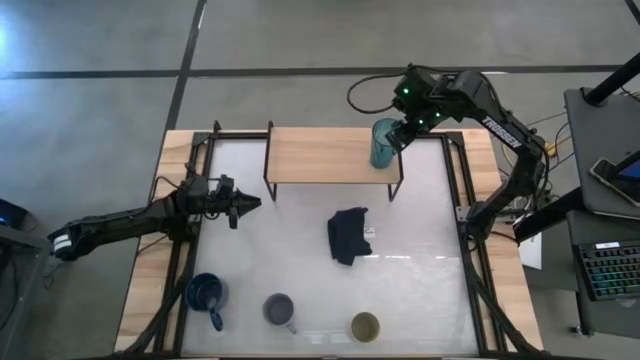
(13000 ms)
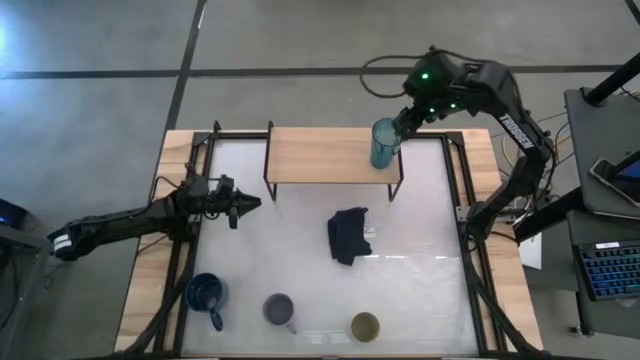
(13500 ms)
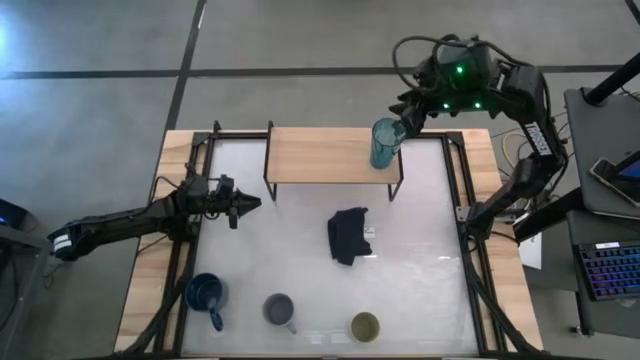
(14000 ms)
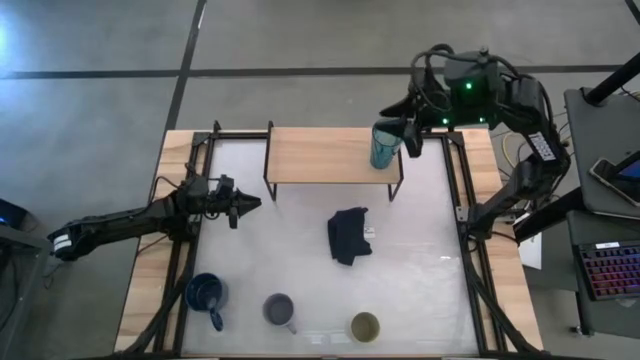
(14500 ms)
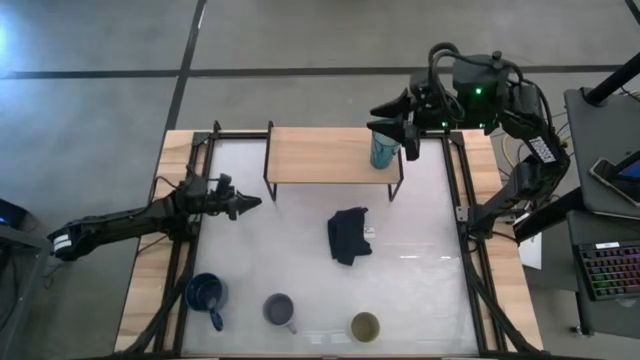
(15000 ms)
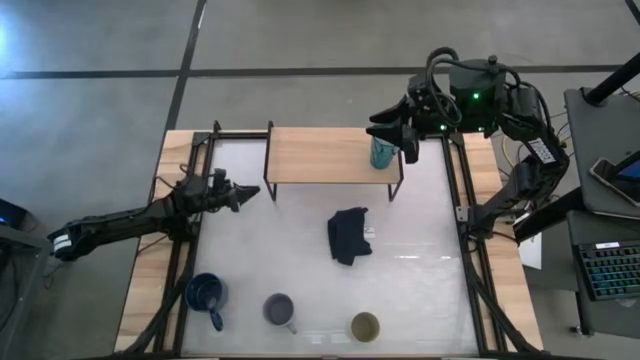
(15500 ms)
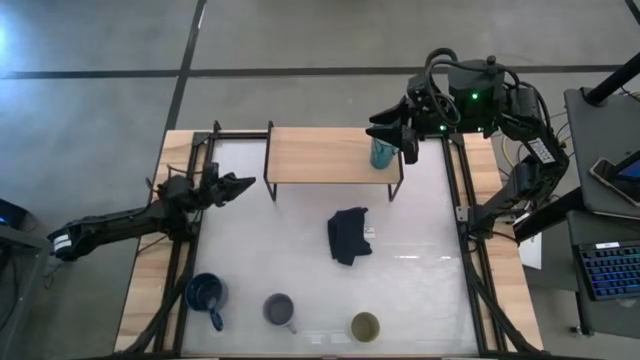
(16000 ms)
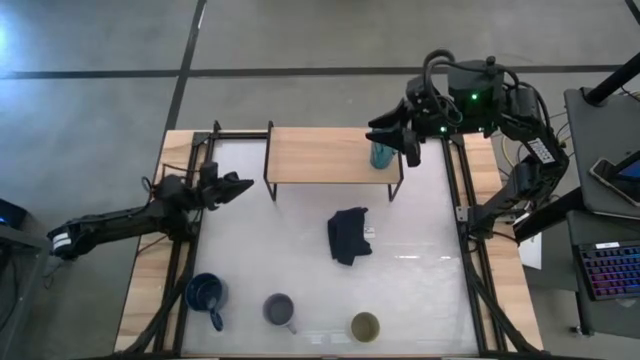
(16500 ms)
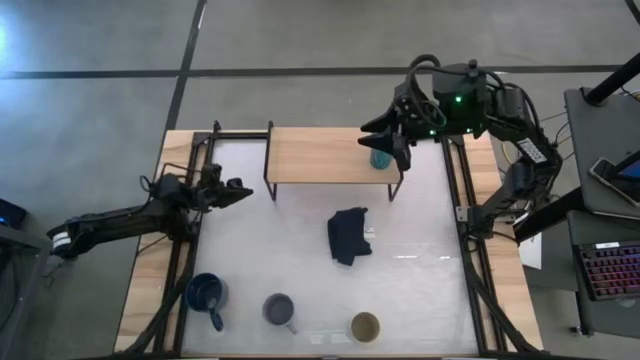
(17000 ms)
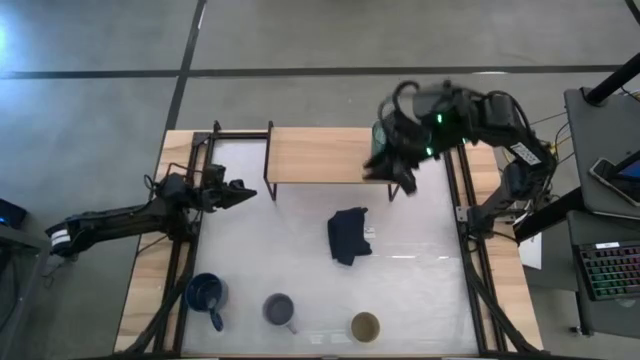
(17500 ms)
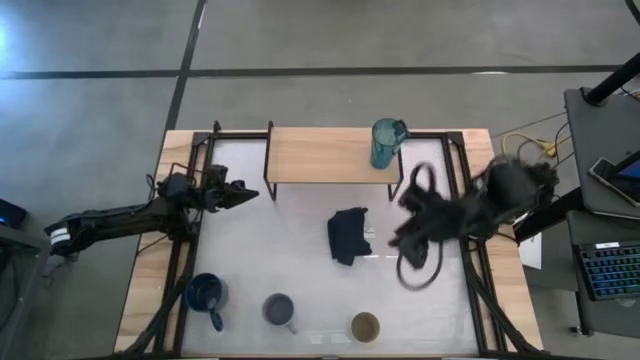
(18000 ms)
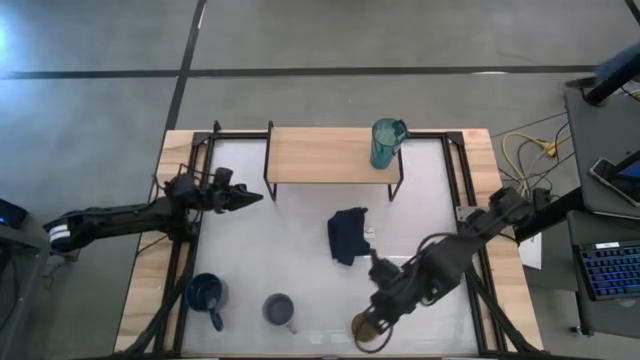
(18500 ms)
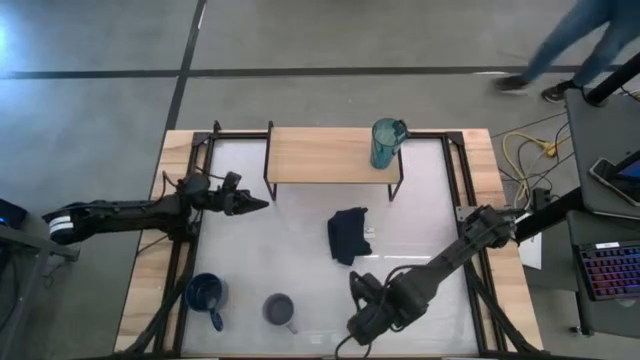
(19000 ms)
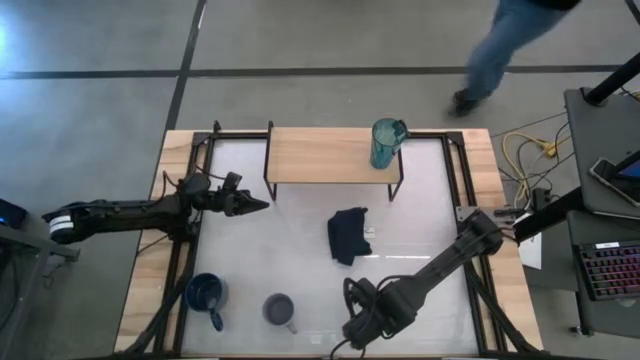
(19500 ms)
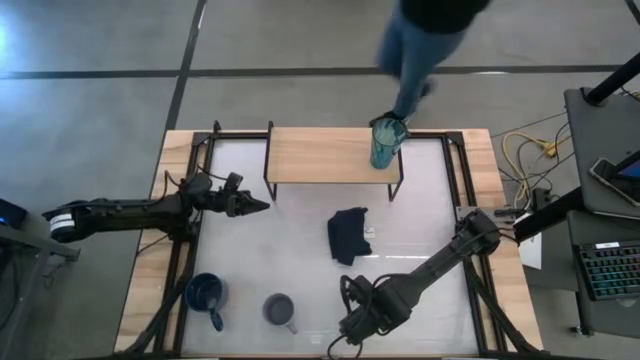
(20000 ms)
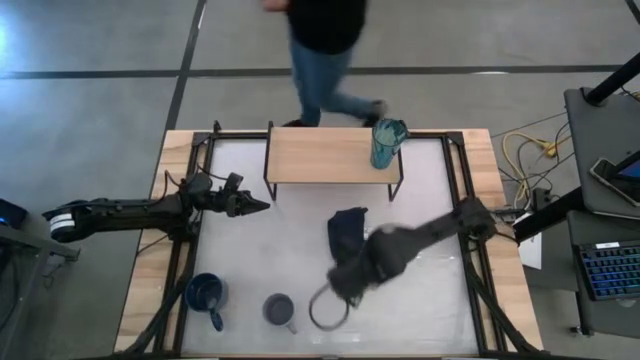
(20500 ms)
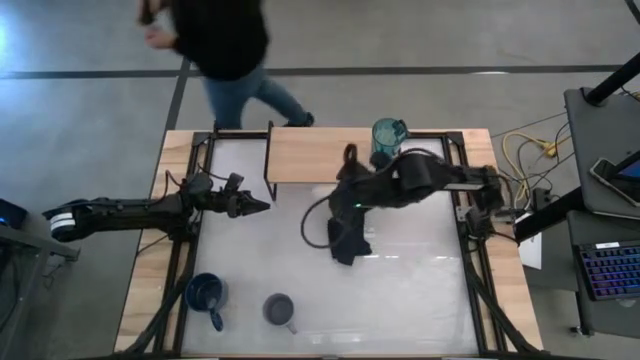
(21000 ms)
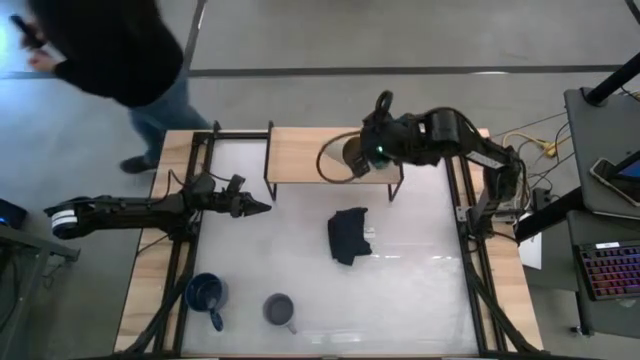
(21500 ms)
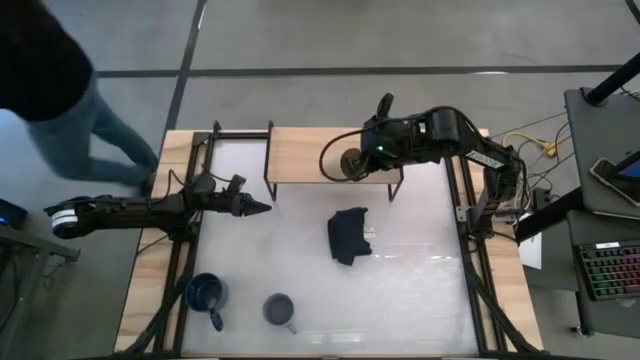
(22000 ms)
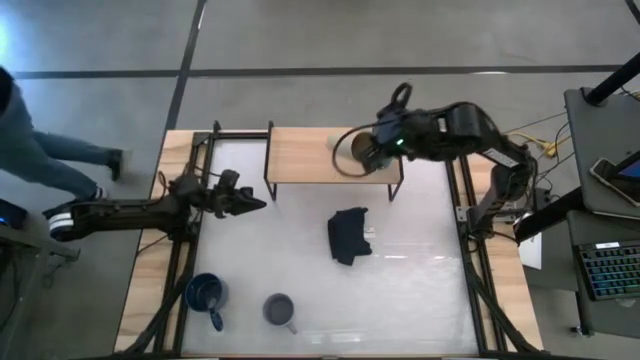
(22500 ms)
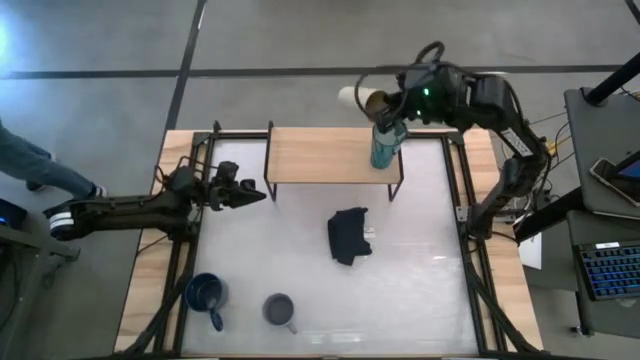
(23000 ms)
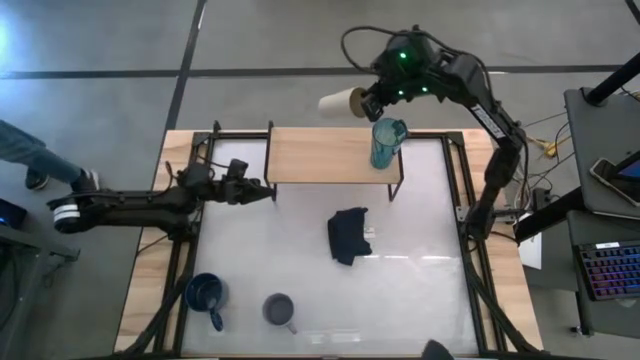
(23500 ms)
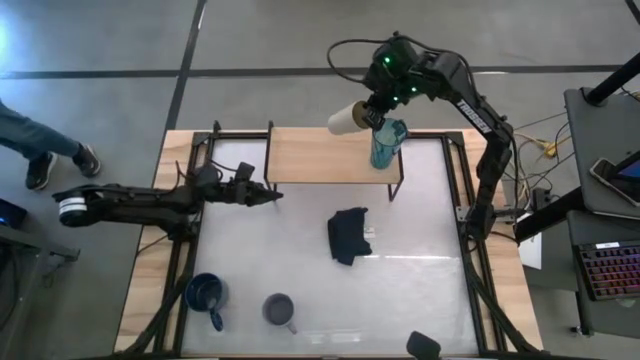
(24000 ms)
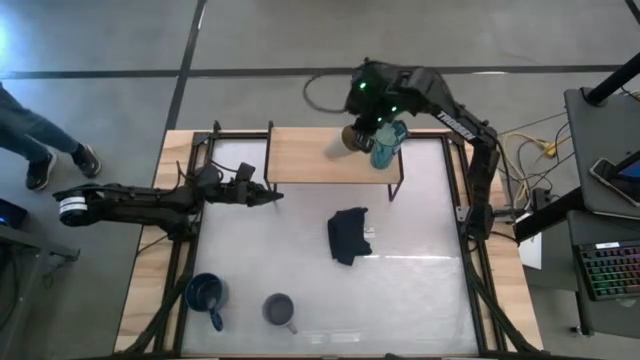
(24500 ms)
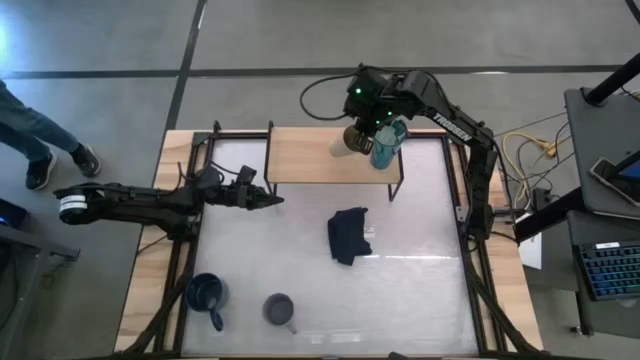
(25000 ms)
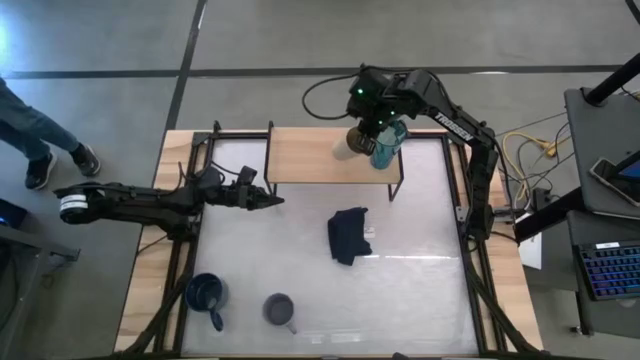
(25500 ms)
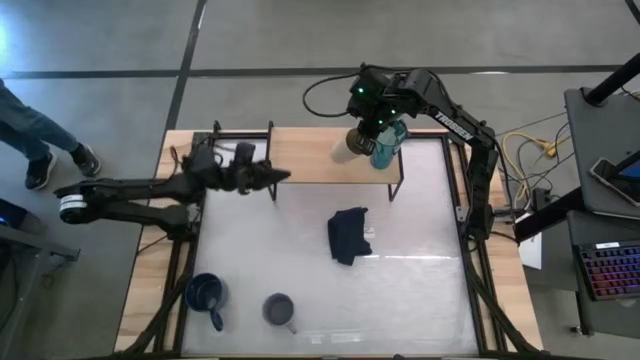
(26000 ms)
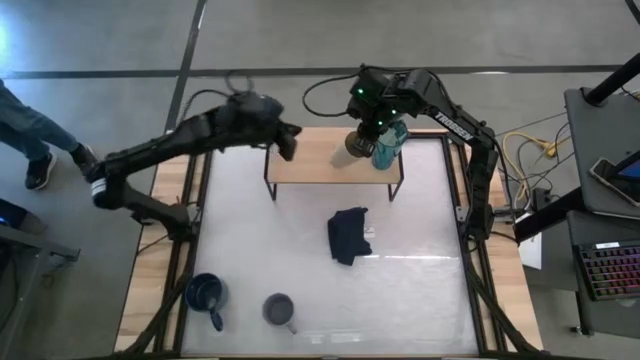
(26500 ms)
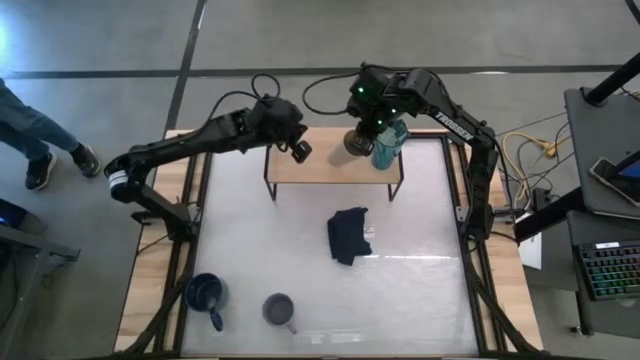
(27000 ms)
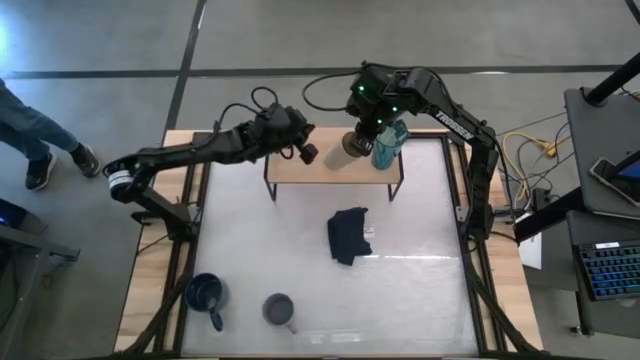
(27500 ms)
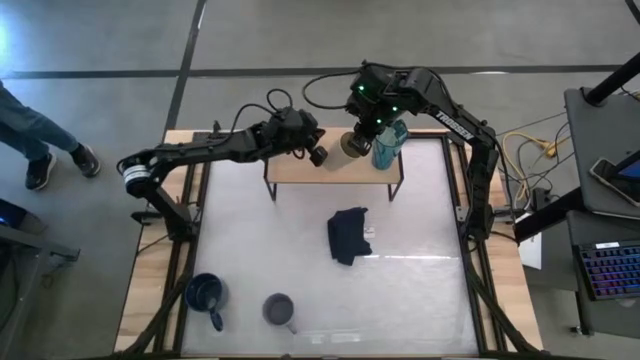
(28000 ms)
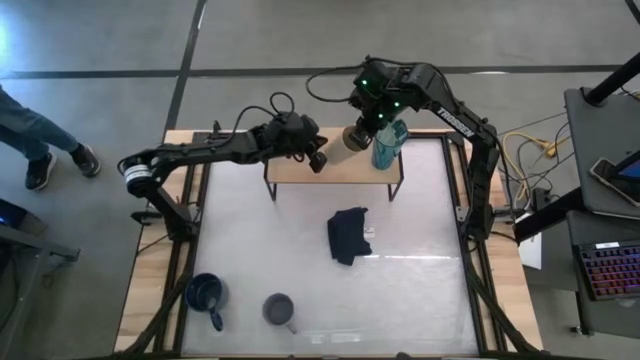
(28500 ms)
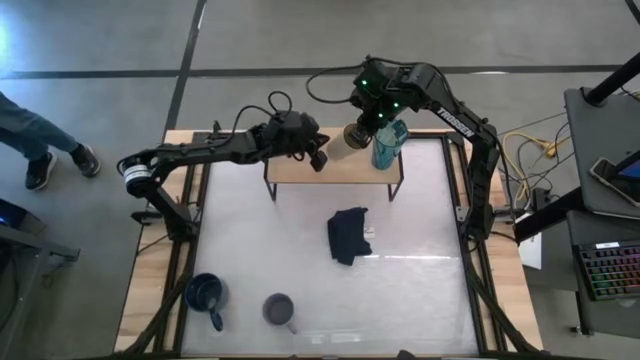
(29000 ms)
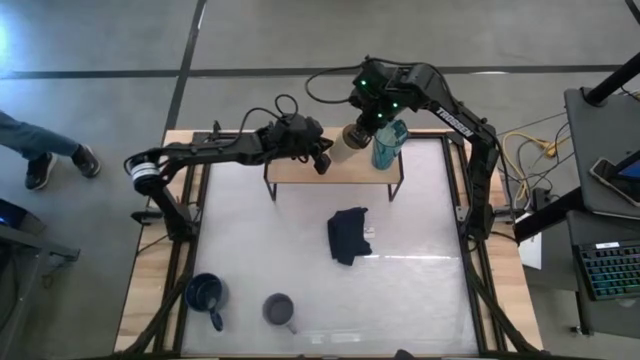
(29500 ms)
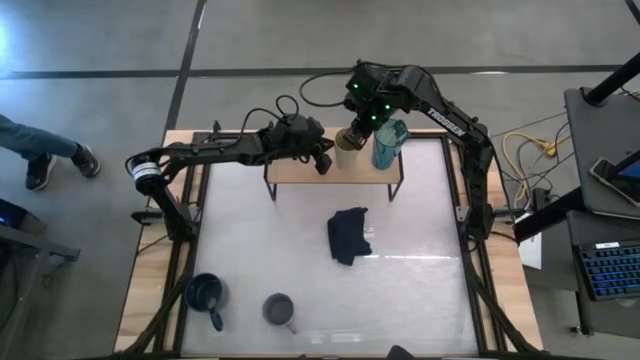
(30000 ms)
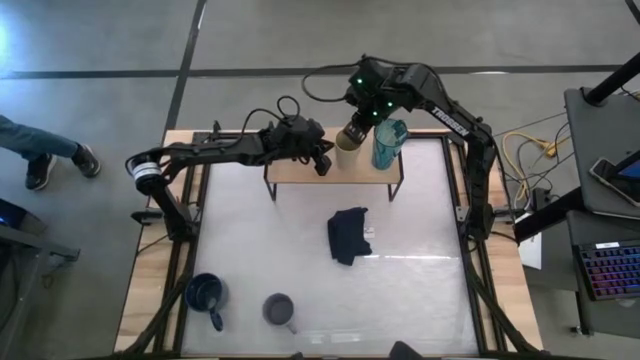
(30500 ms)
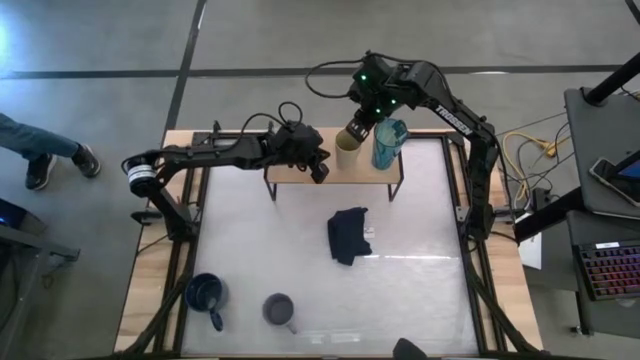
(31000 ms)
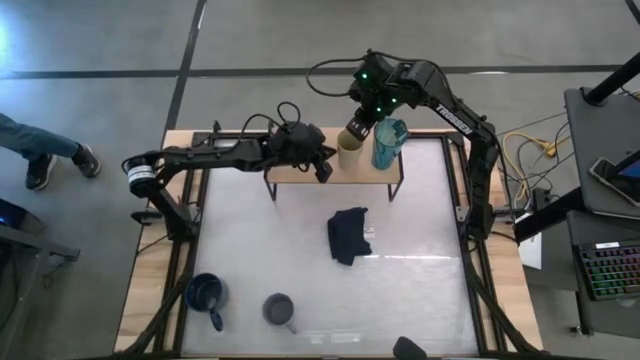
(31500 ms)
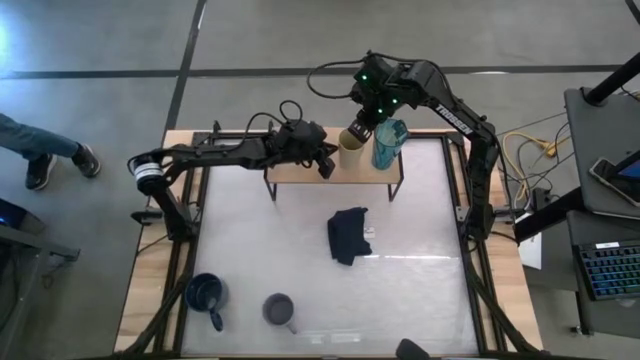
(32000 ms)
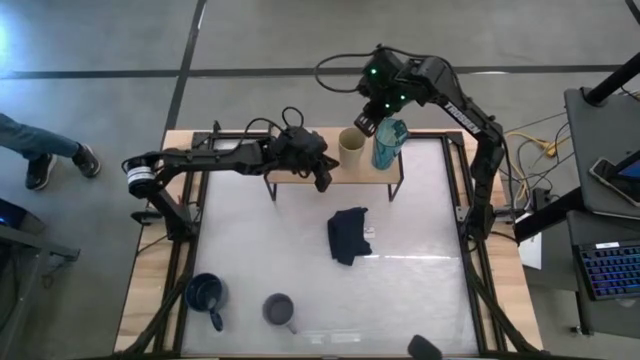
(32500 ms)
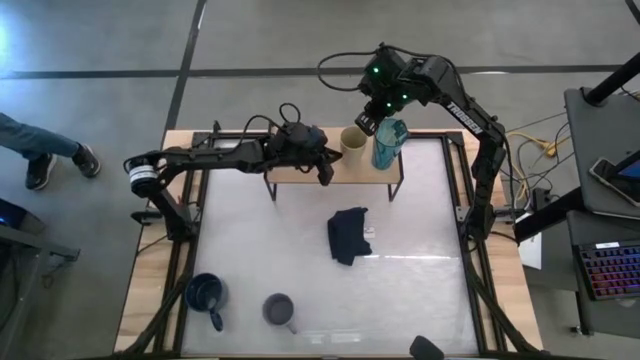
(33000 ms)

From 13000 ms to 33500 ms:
Task: Stack small to large cups/mugs on shelf
Put the light brown cup on the shelf
